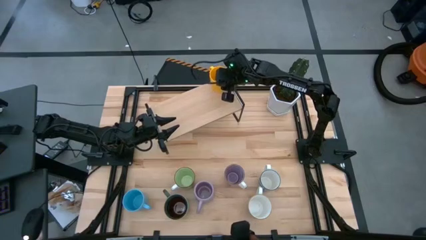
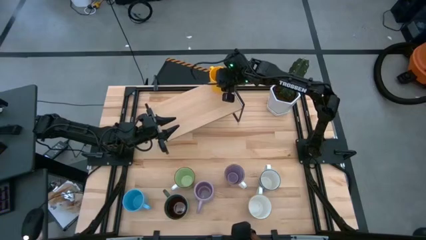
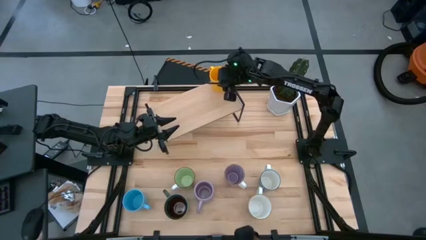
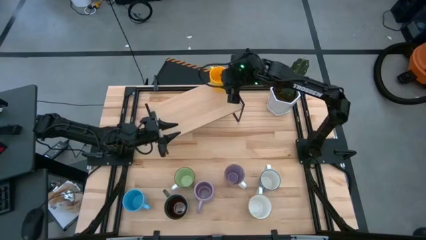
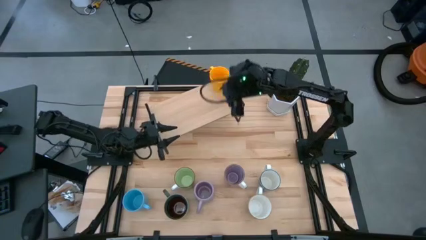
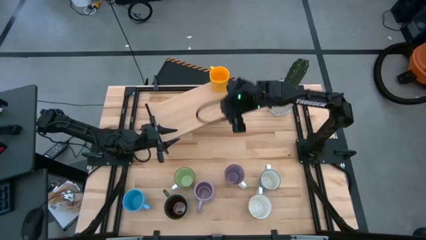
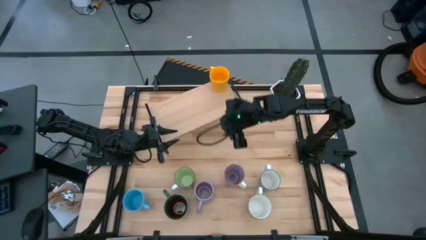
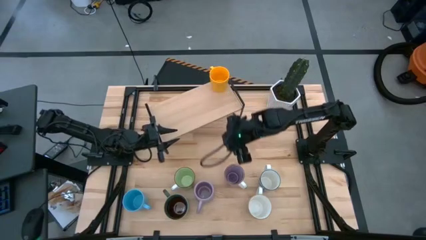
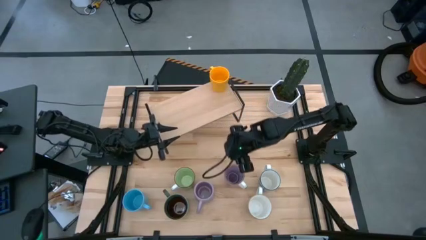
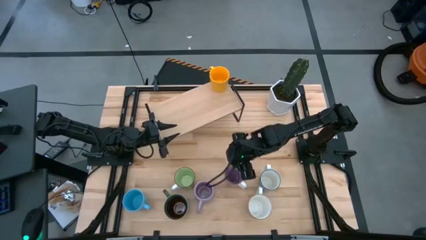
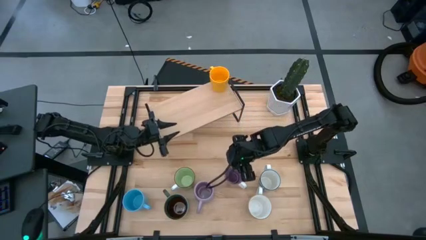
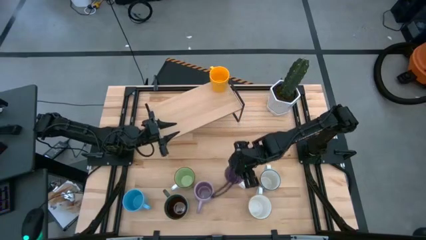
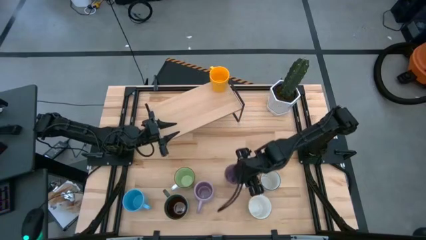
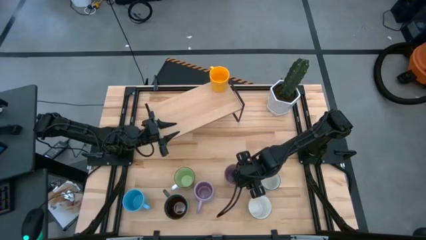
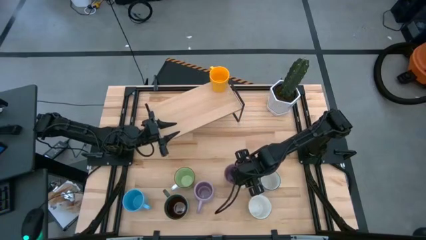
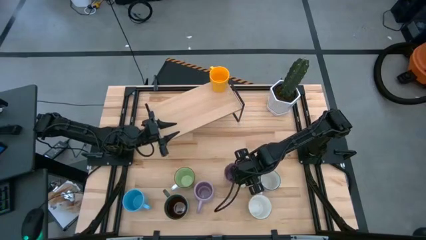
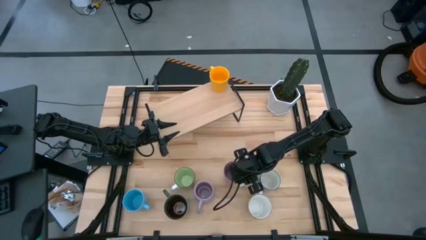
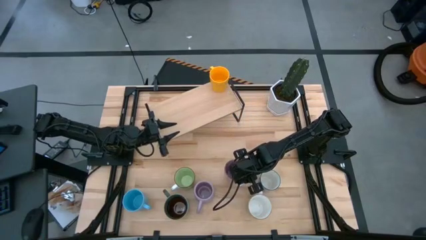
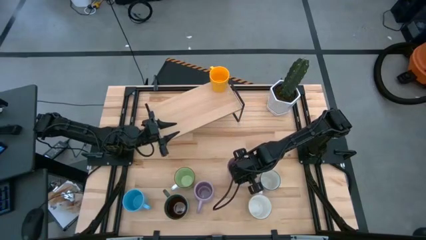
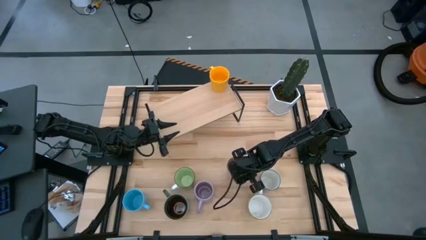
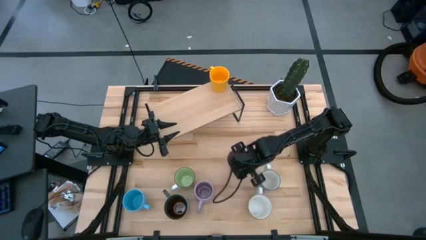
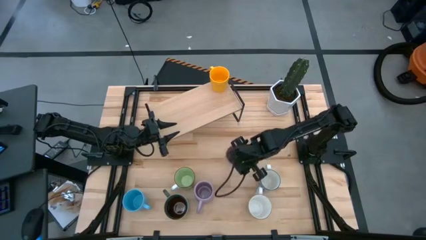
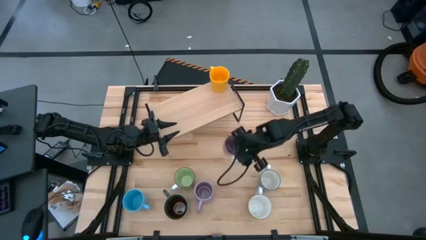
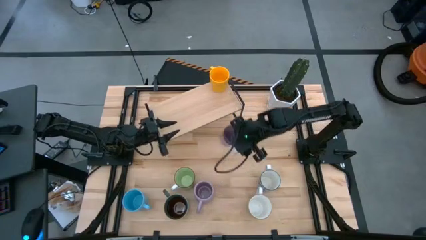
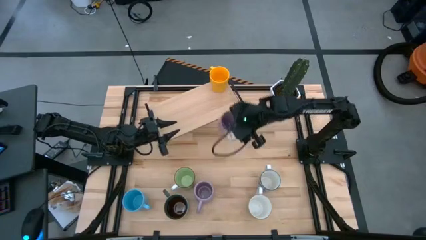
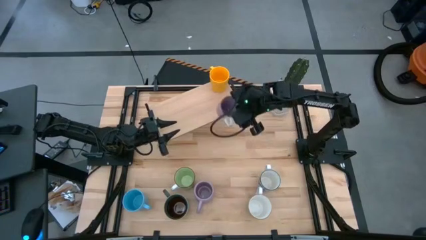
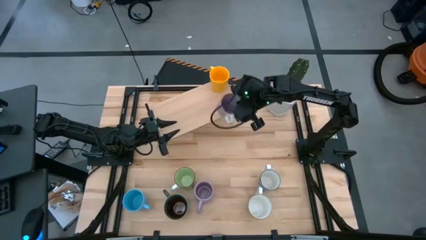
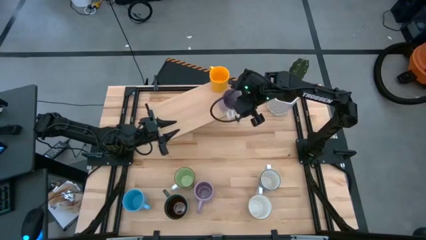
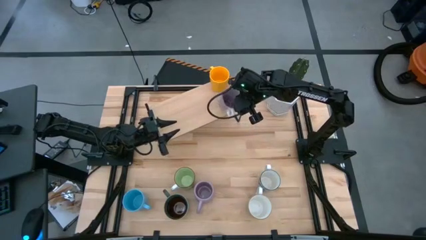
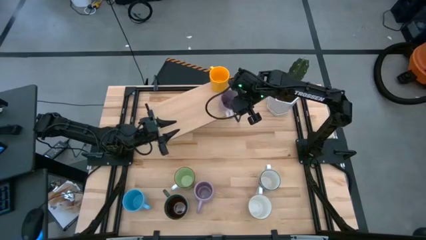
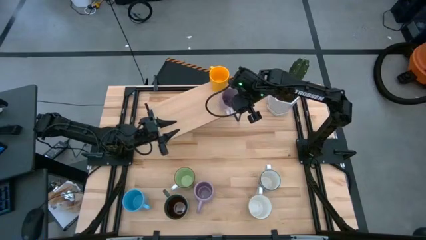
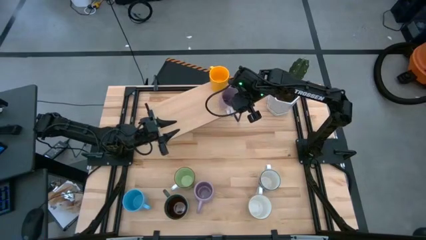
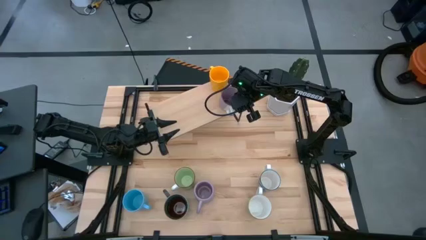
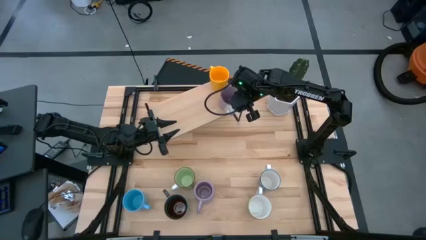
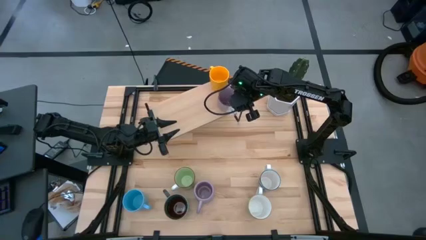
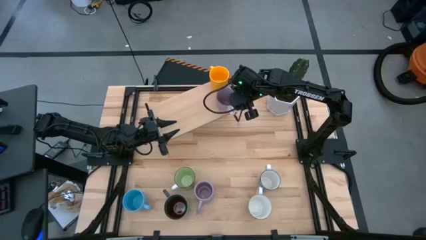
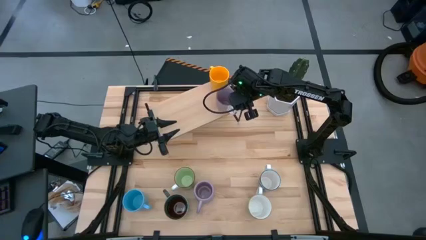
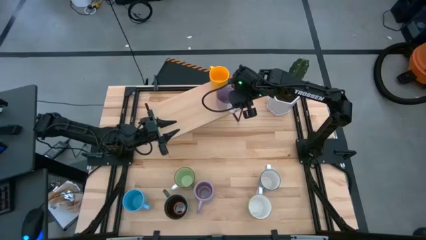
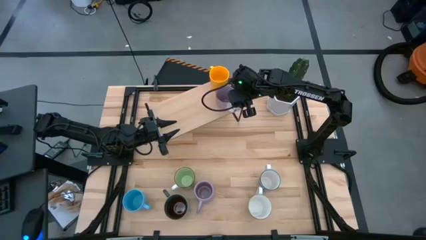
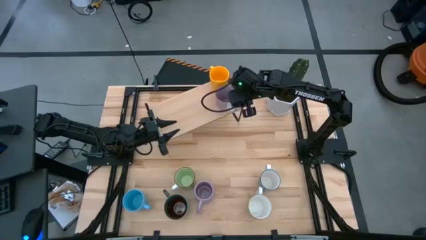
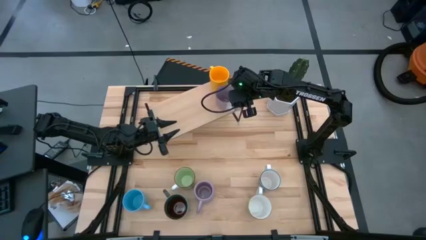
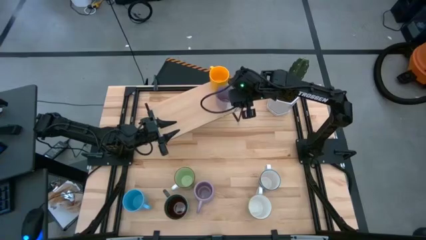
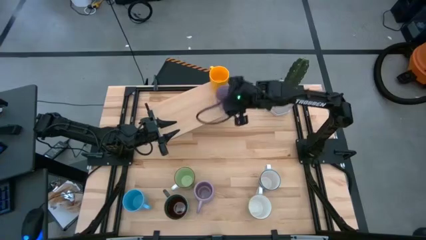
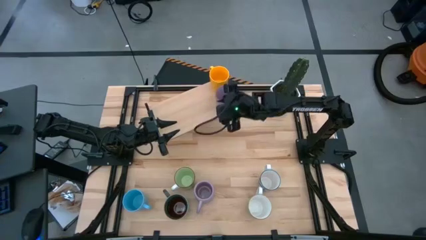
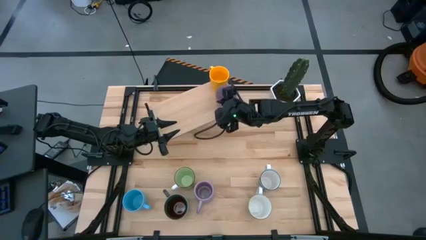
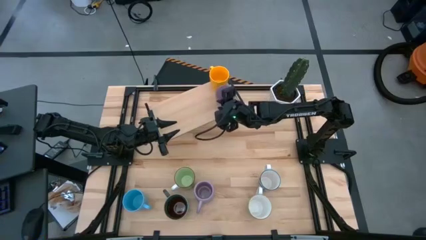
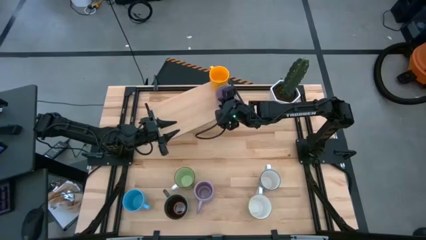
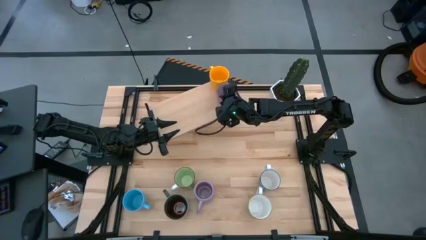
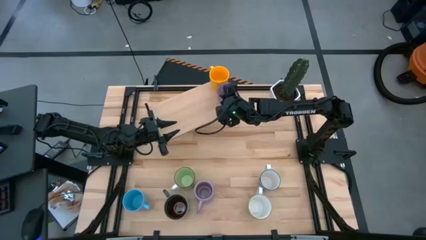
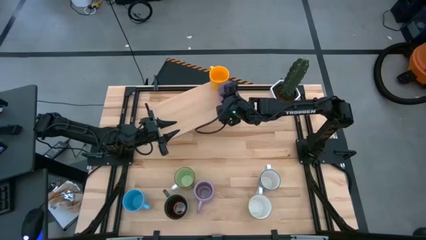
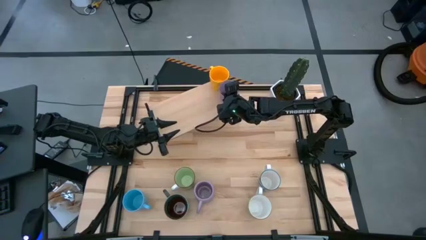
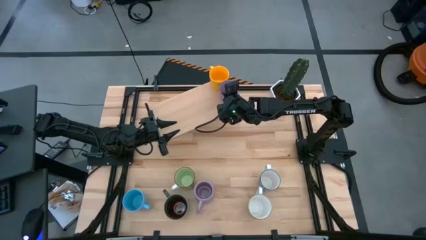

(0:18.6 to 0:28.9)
Task: Place coffee mugs
Put the white purple patterned mug on the shelf
